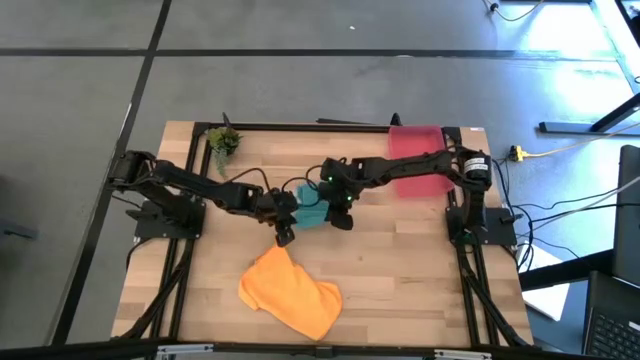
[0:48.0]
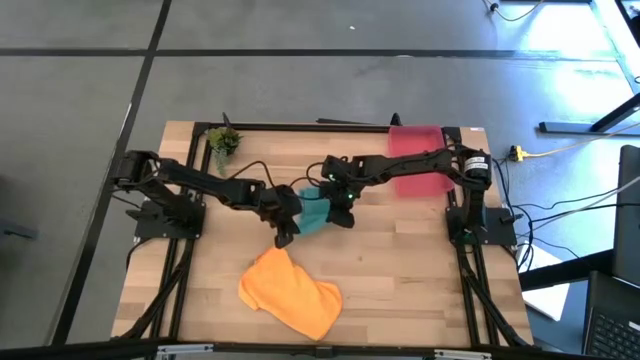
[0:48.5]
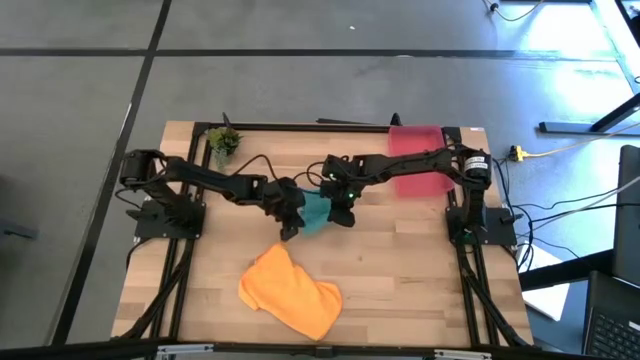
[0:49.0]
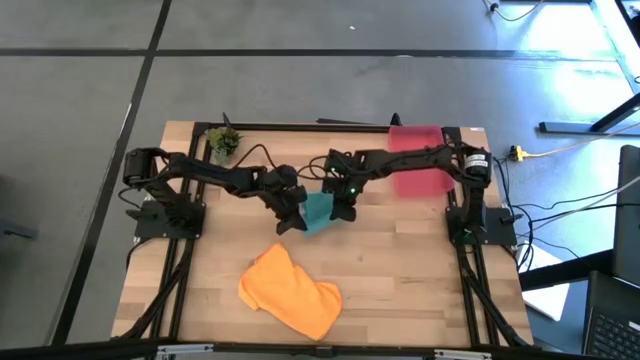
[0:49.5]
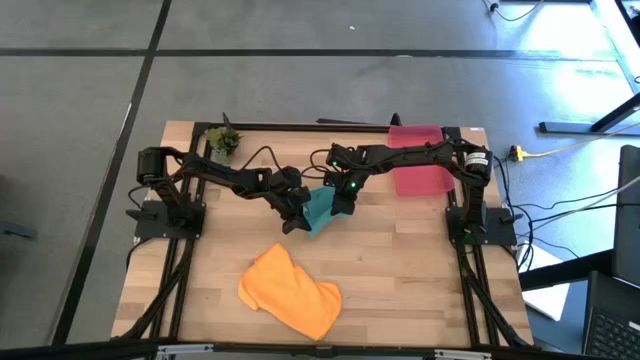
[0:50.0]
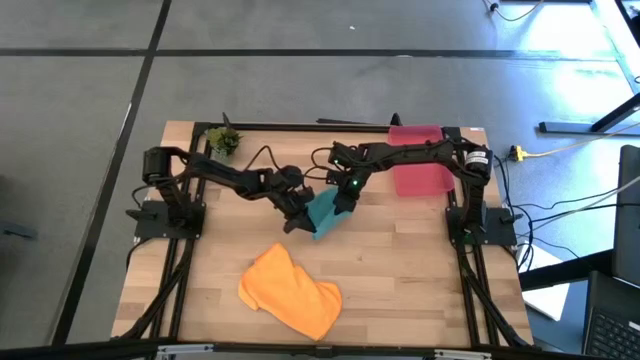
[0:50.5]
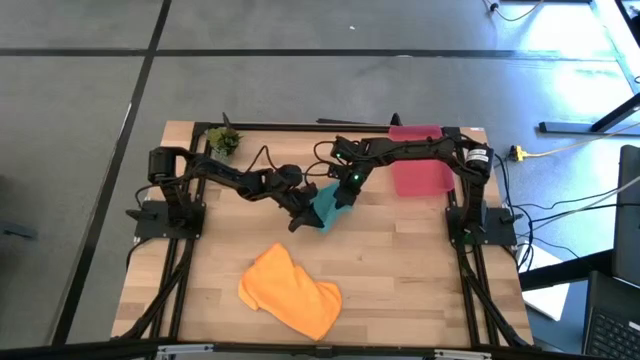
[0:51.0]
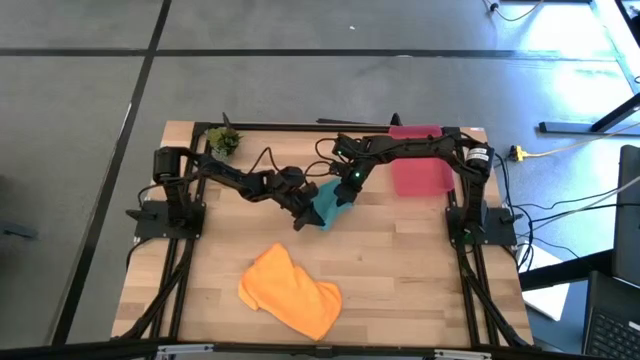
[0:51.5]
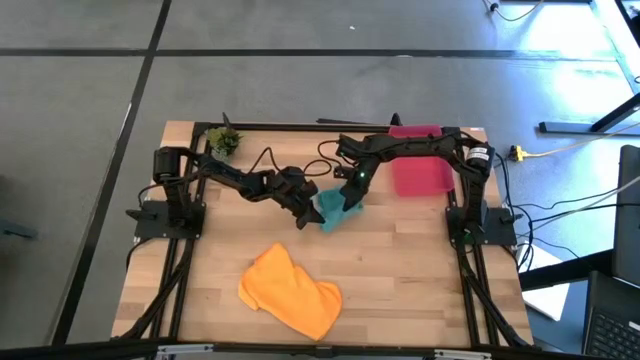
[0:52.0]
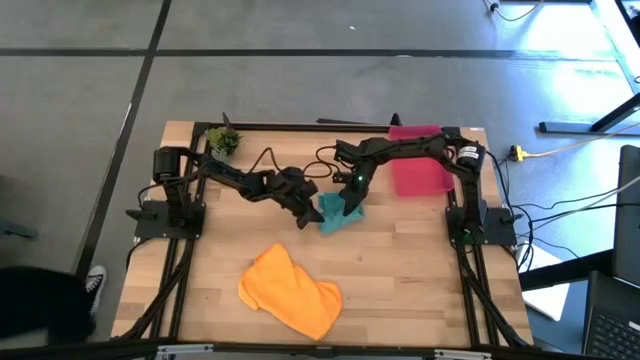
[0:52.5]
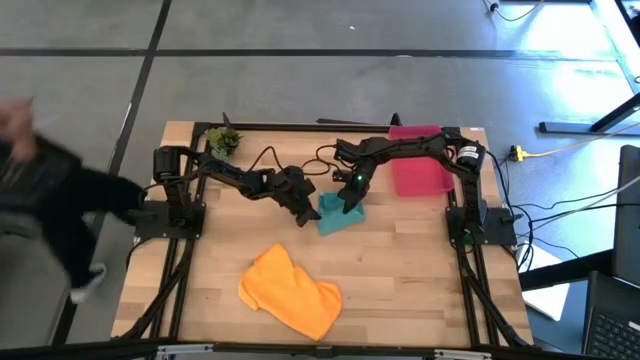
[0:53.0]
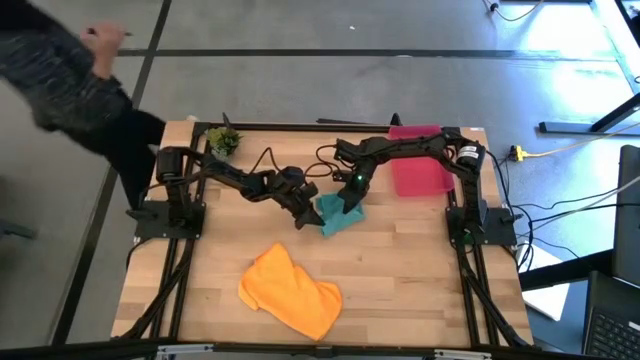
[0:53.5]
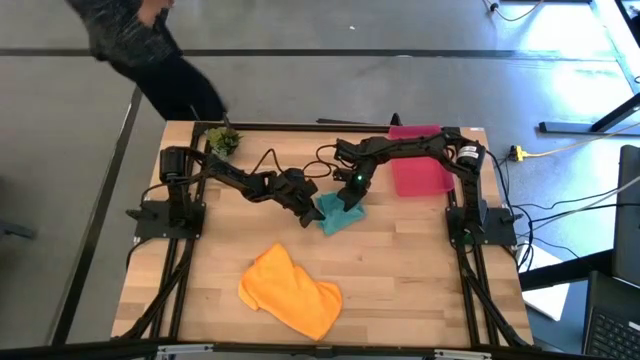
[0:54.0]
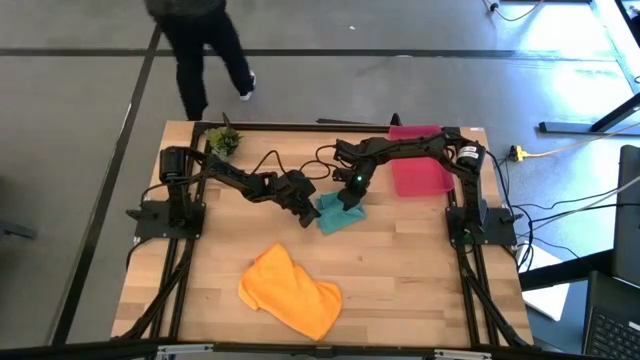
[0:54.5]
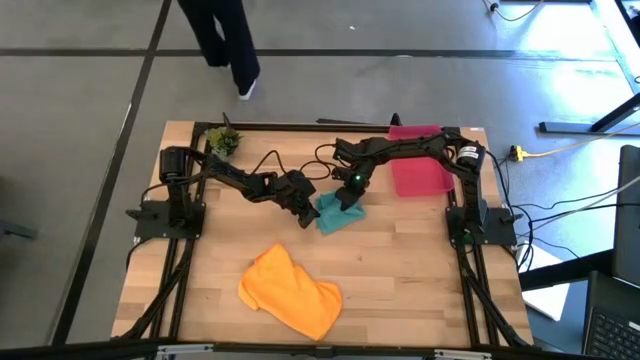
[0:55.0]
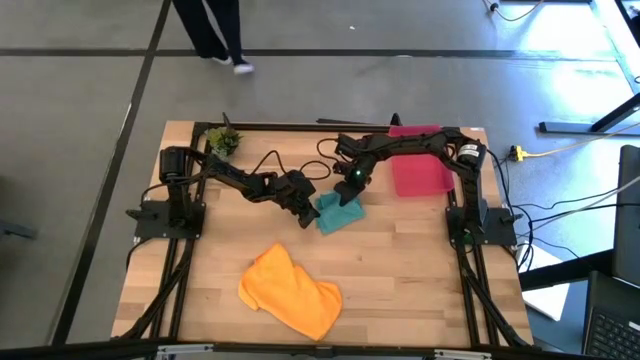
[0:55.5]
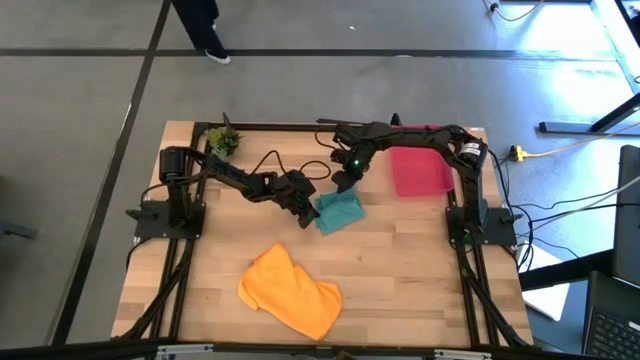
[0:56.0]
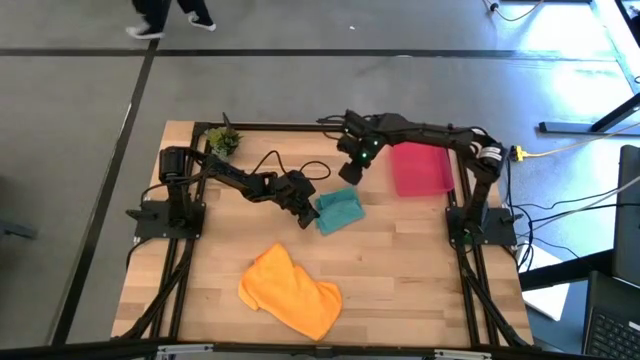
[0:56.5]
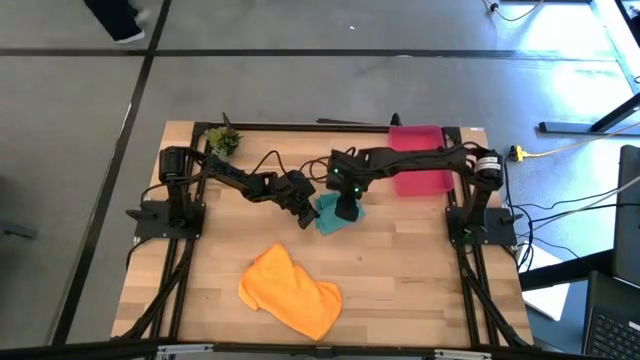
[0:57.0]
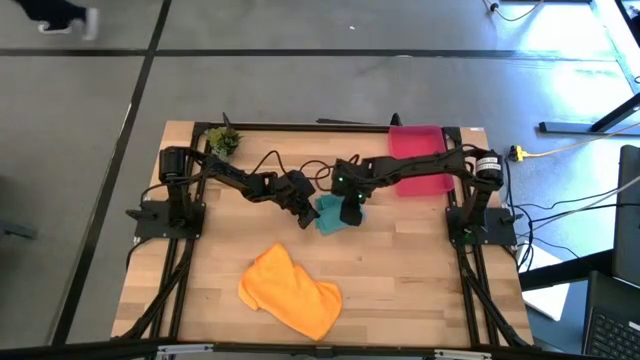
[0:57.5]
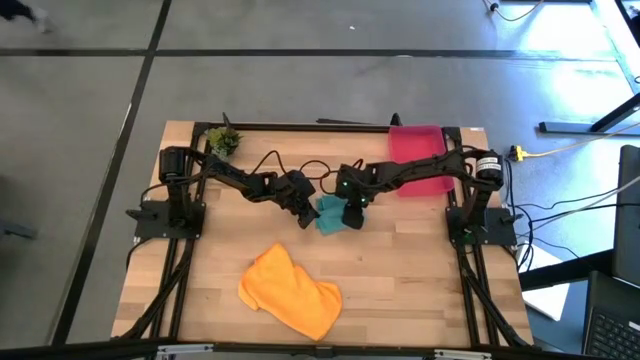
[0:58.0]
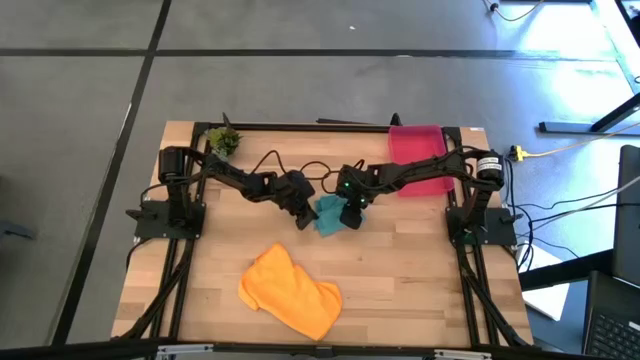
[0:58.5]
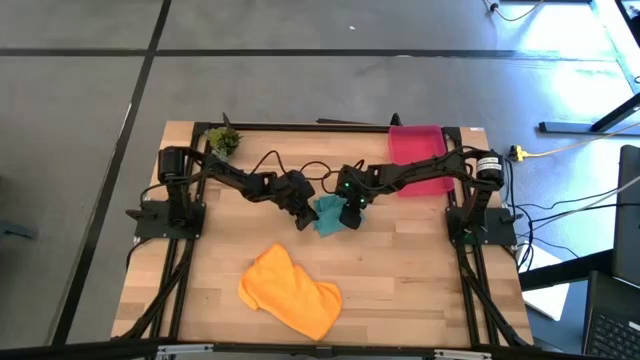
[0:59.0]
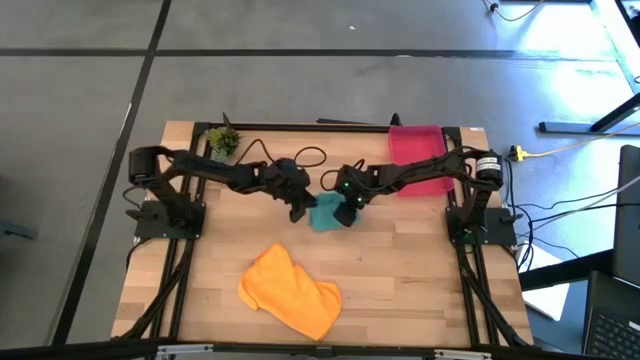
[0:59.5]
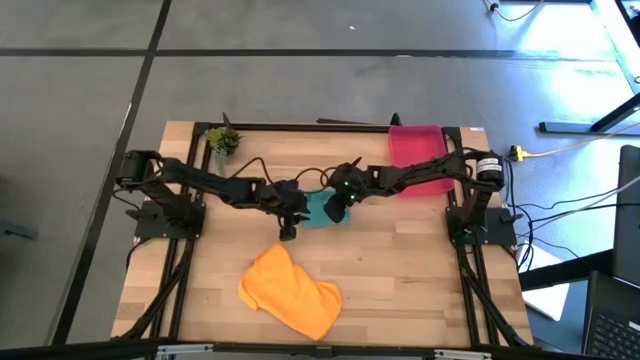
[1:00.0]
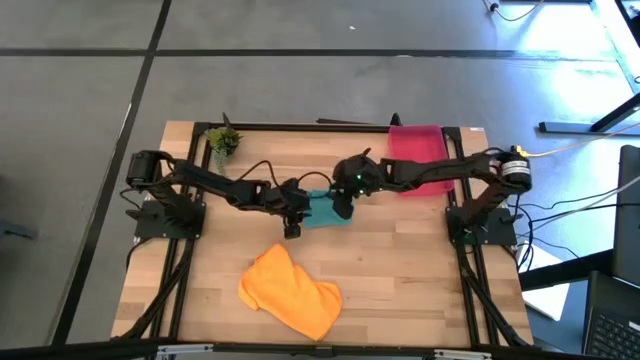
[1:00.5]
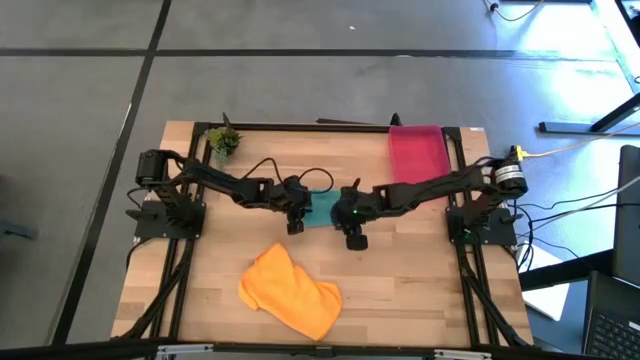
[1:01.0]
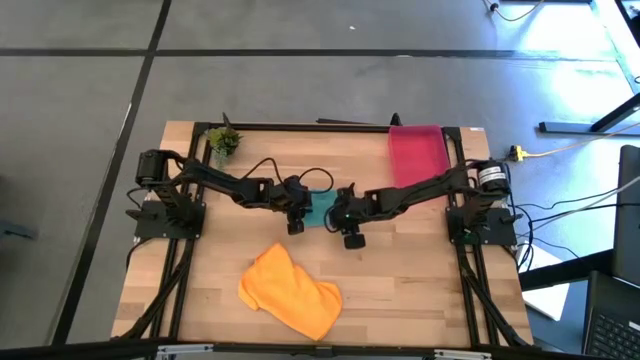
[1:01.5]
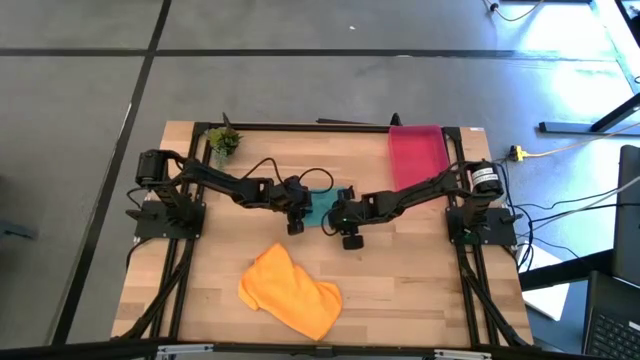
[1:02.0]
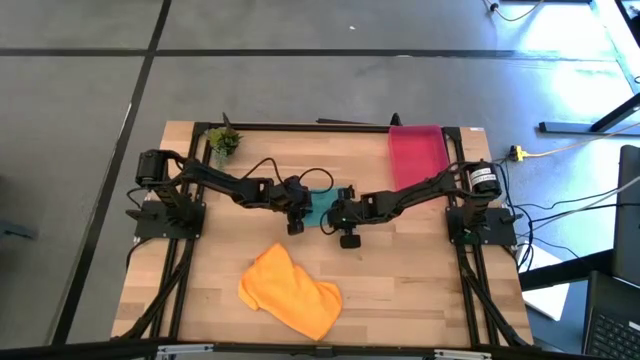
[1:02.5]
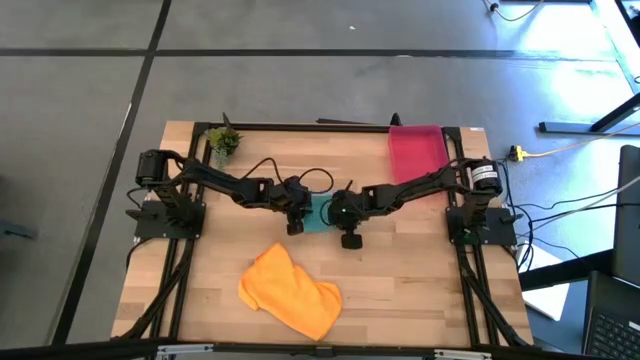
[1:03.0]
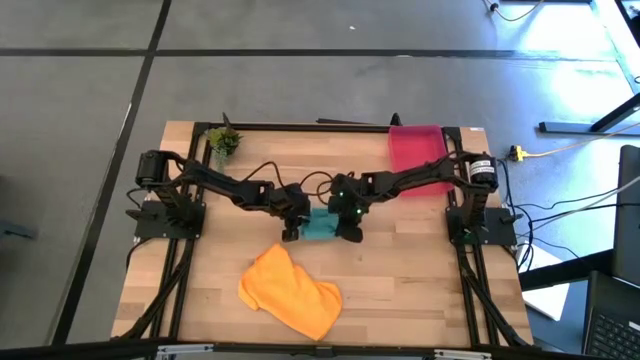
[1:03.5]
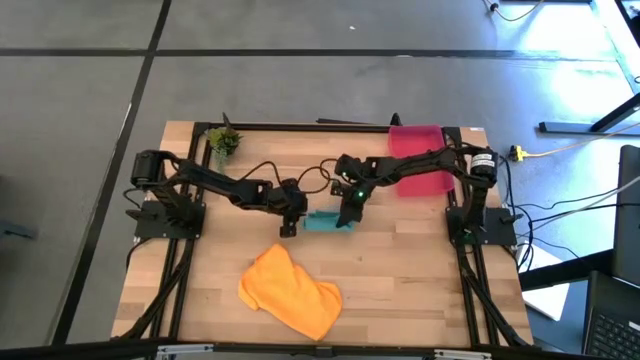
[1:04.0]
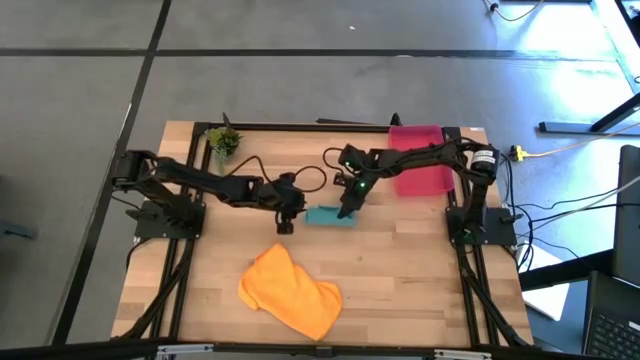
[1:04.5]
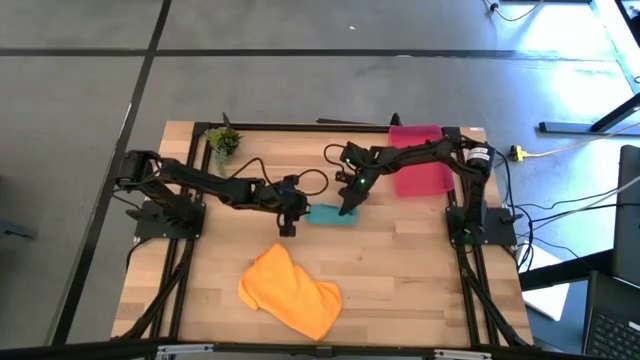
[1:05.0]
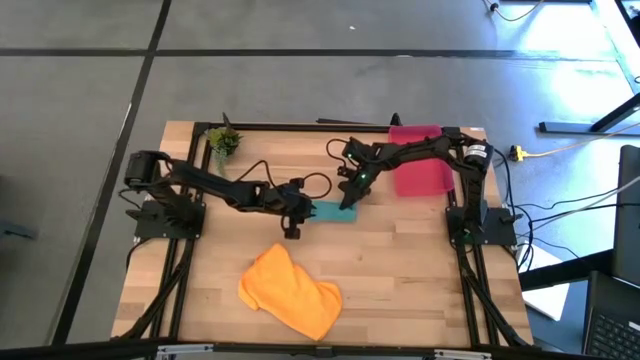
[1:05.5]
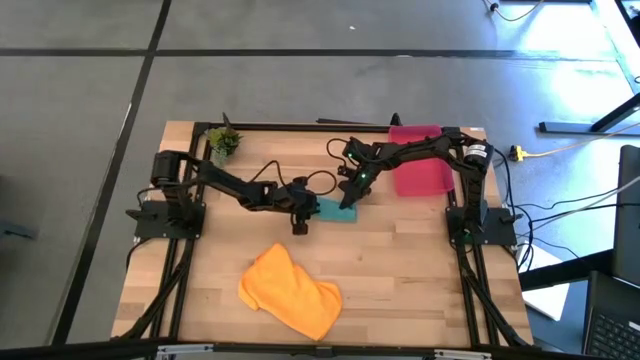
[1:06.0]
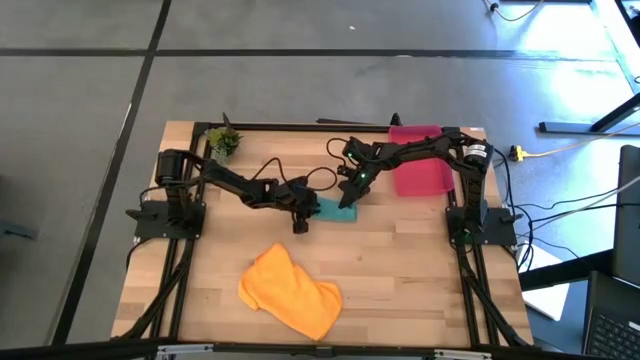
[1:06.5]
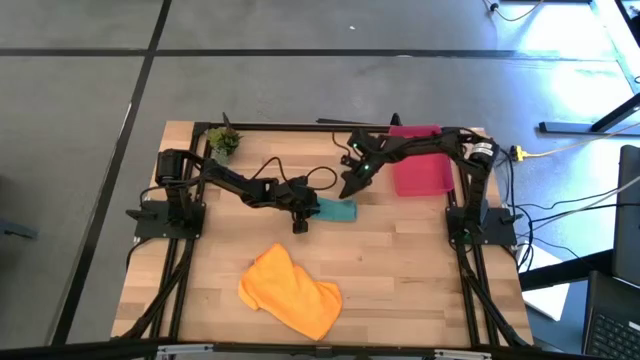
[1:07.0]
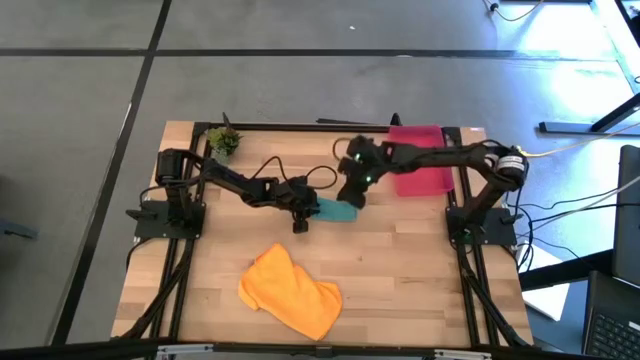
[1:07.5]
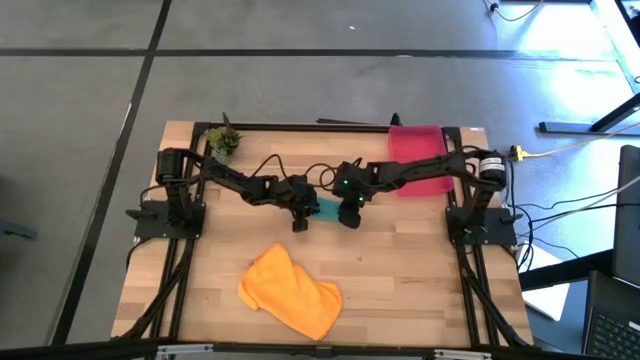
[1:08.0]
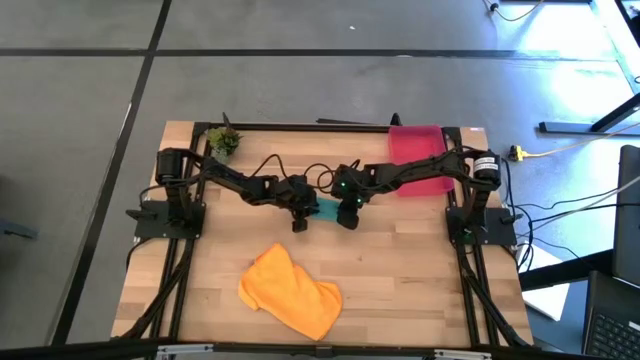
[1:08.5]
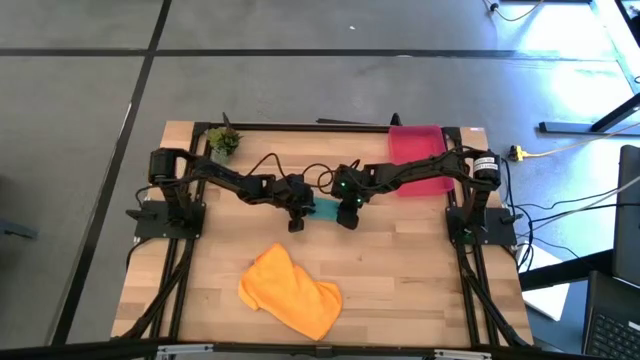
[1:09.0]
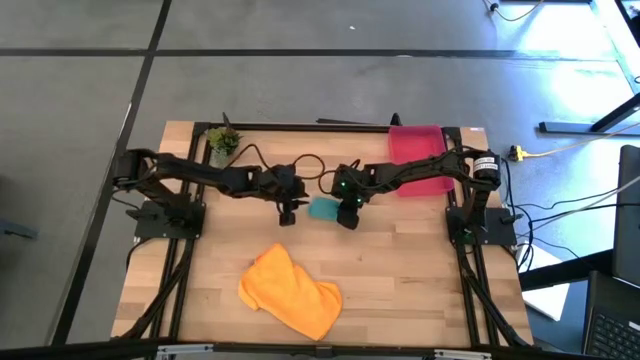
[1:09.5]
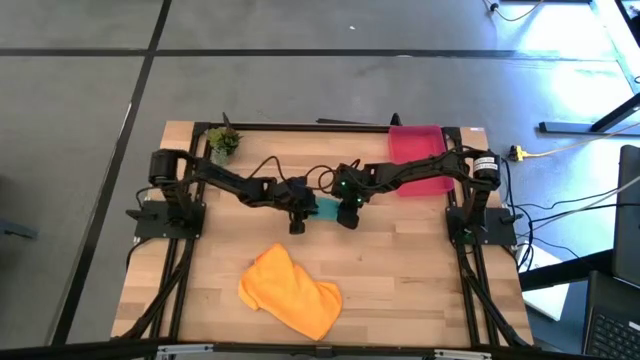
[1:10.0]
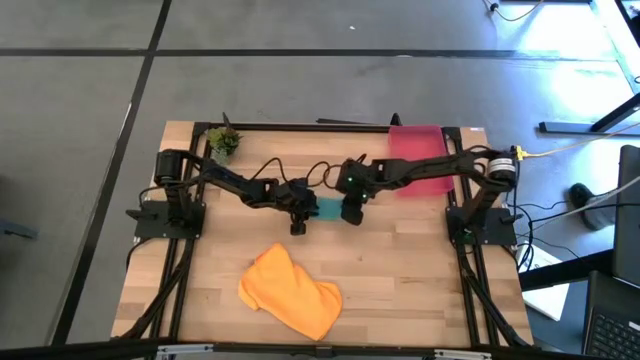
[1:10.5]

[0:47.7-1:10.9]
Task: Roll microfiber towels into tight, uniform cylinder then place into a basket
Roll the blue microfiber cloth on the table
